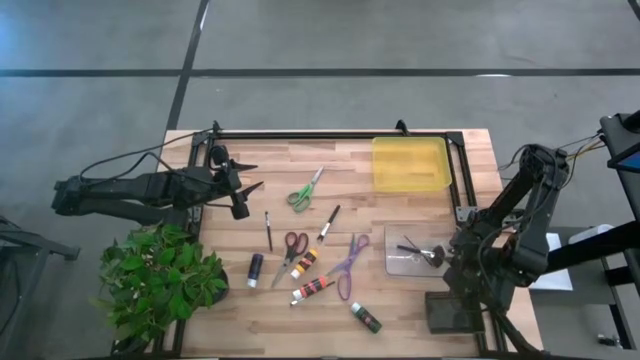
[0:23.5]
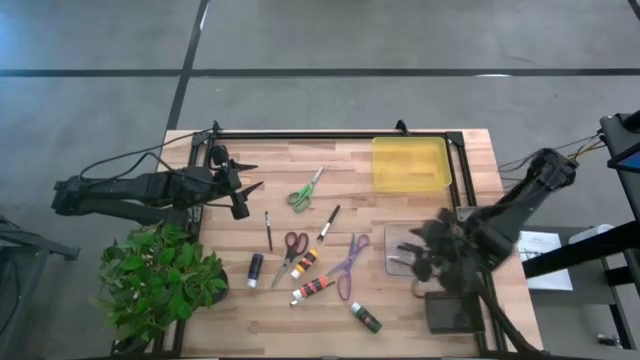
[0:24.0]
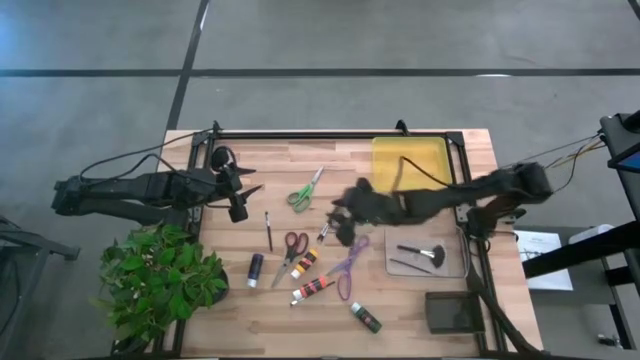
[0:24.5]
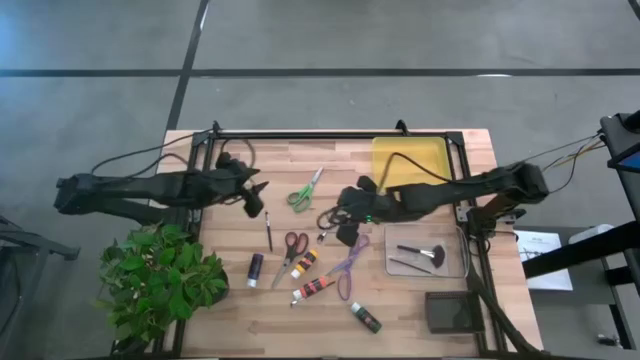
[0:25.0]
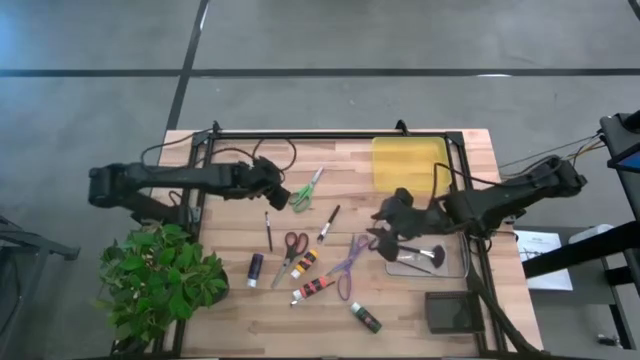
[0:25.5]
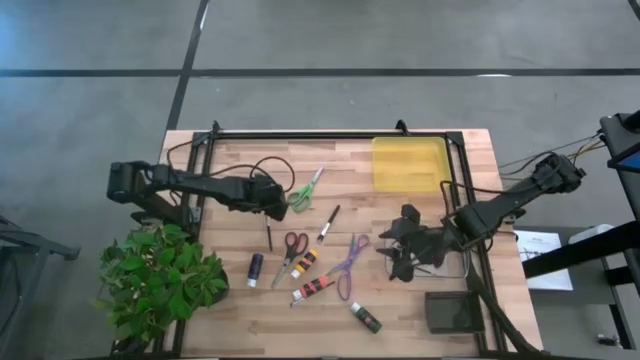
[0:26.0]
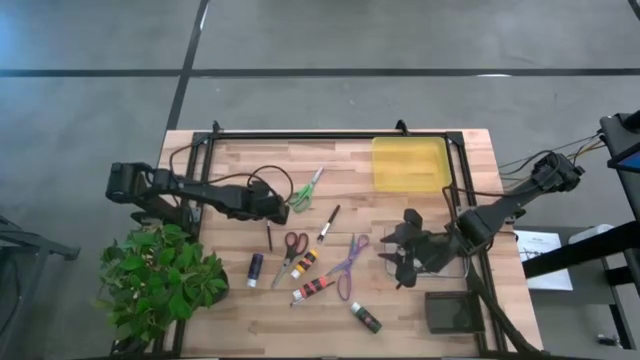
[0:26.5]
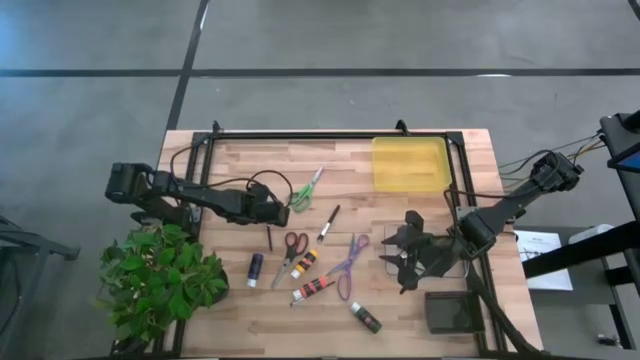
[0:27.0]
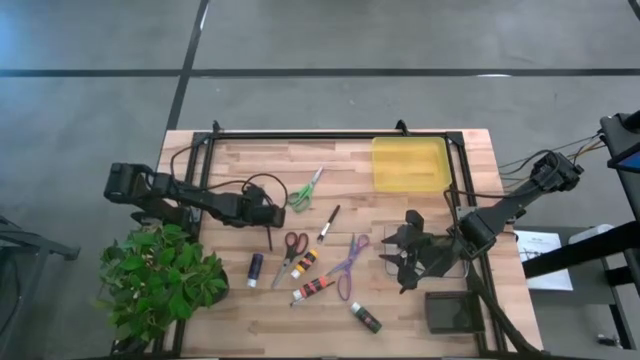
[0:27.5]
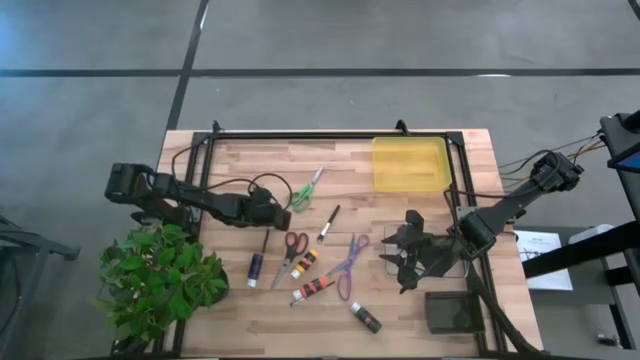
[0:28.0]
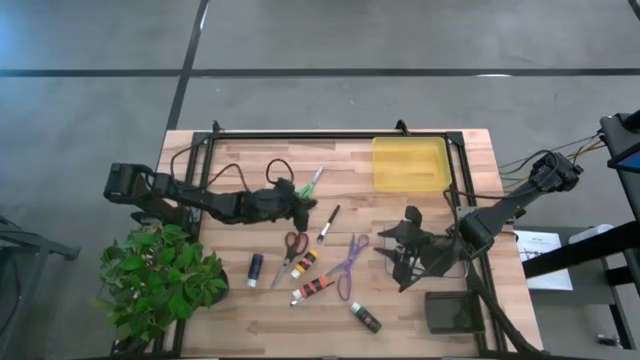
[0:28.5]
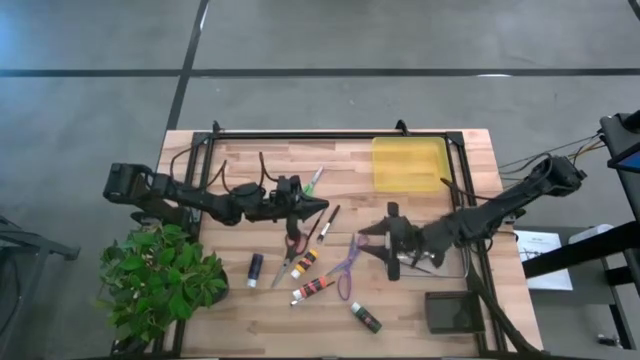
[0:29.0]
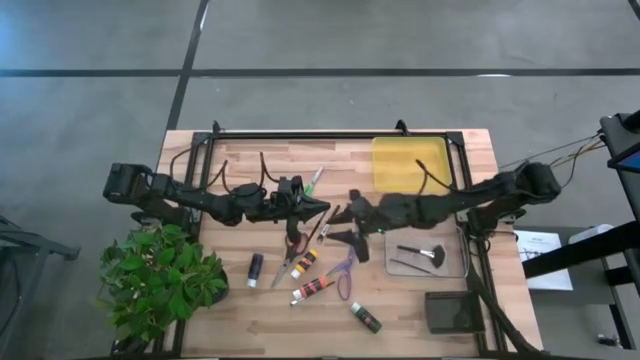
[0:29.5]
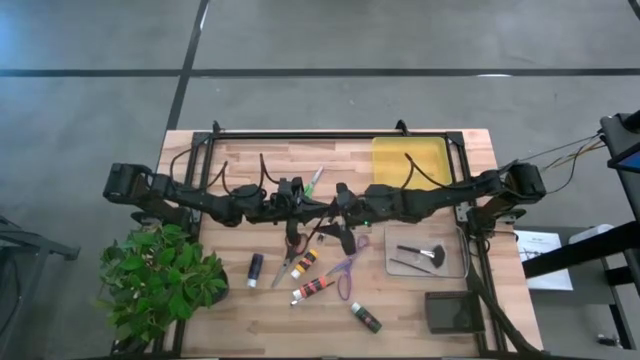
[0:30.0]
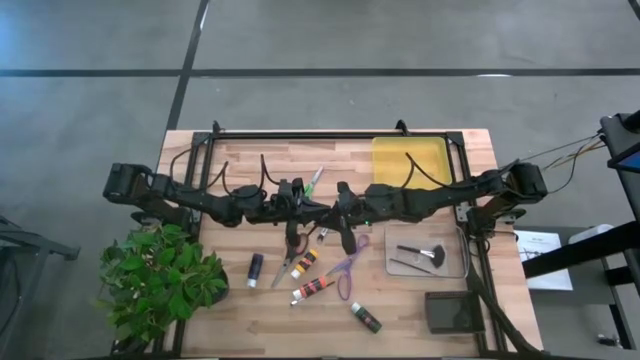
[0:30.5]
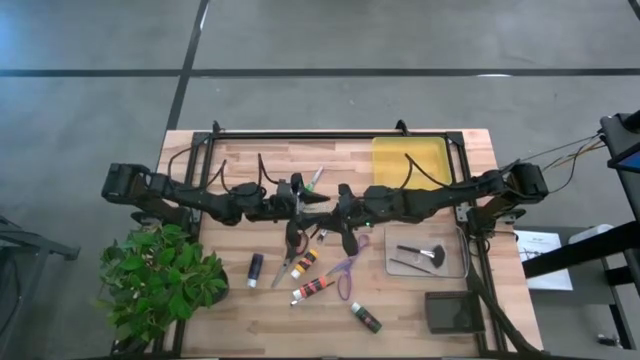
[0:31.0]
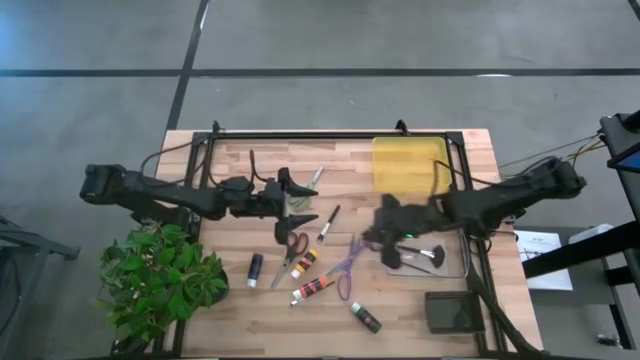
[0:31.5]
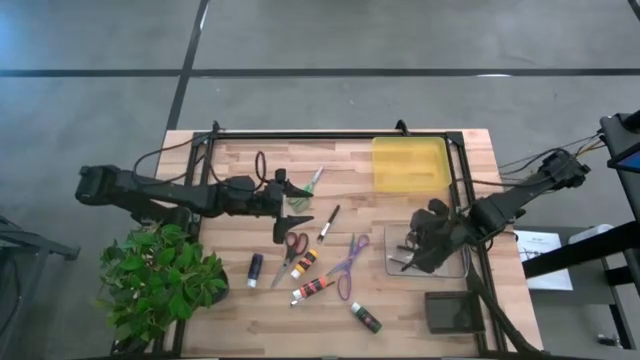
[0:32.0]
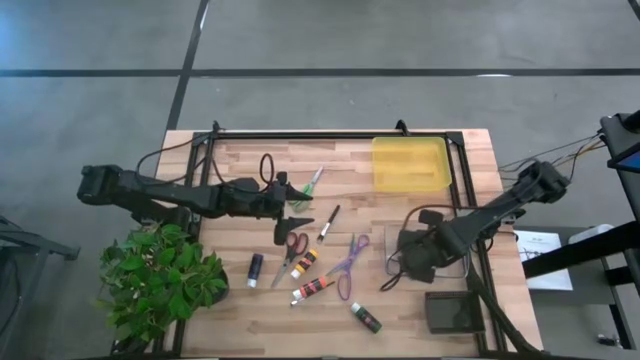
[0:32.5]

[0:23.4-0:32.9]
Task: Pick & Place Paint Supplies
Put the foundation brush into the transparent bin

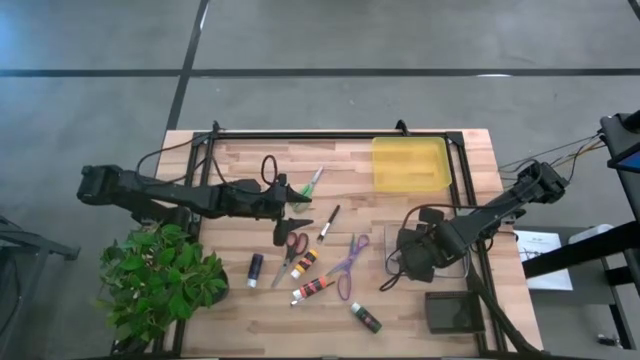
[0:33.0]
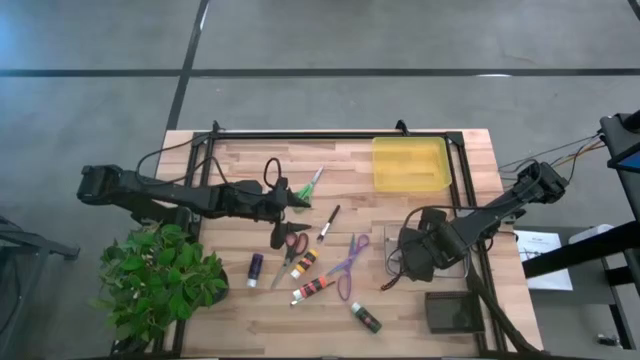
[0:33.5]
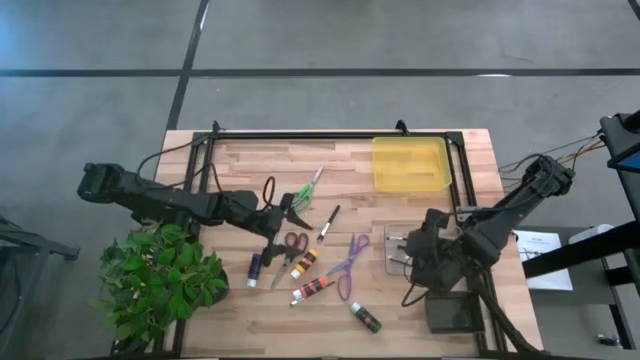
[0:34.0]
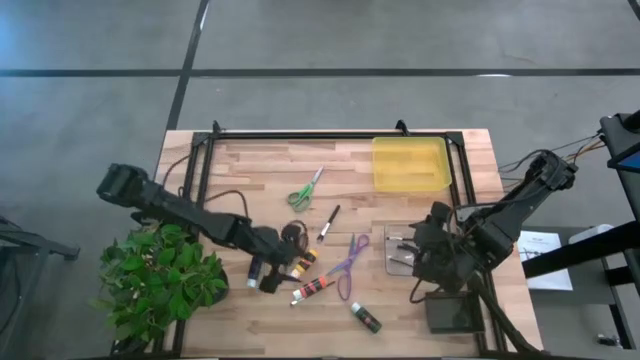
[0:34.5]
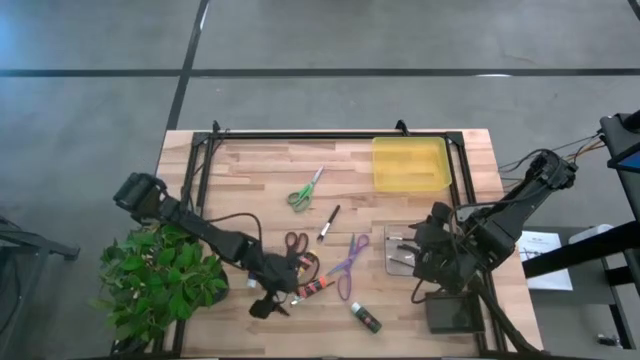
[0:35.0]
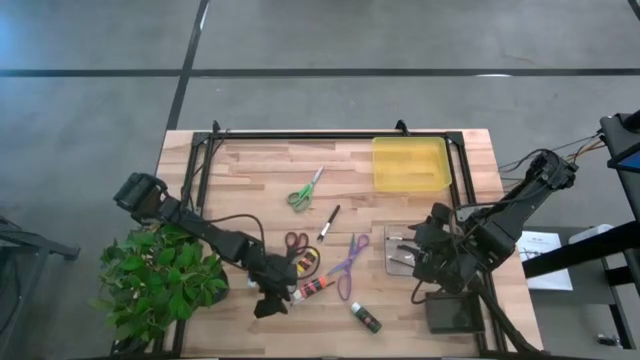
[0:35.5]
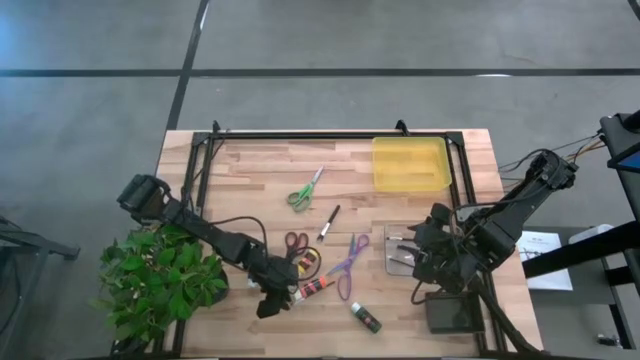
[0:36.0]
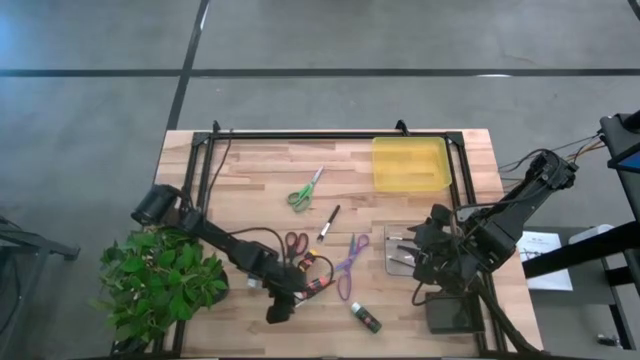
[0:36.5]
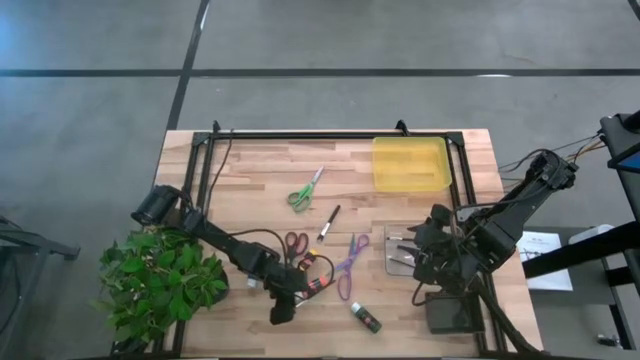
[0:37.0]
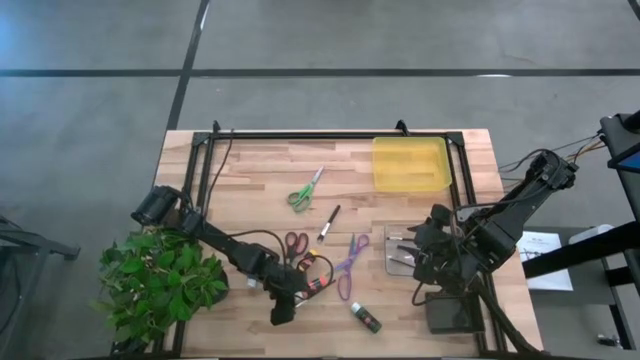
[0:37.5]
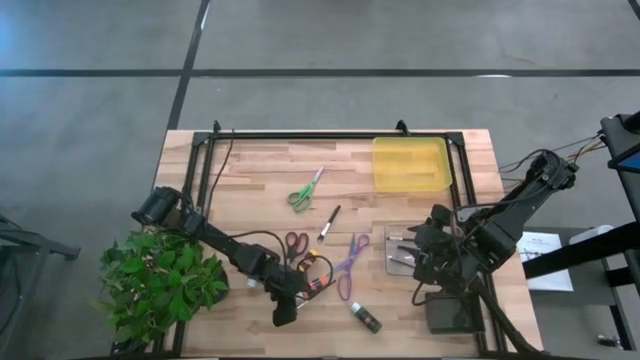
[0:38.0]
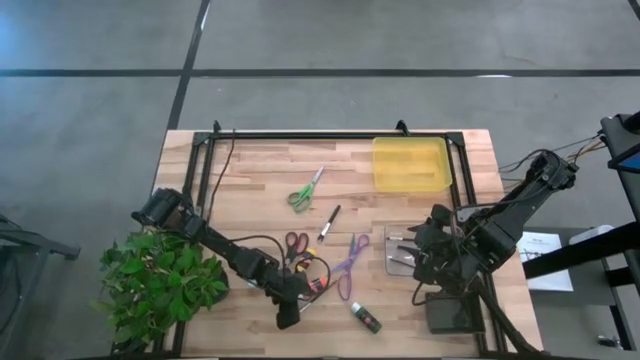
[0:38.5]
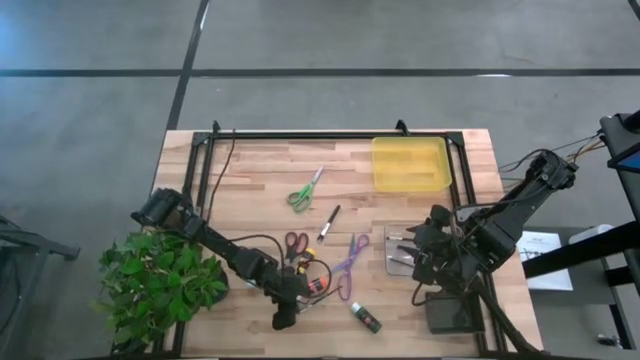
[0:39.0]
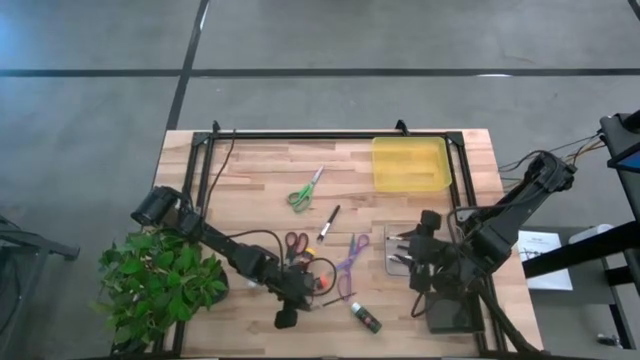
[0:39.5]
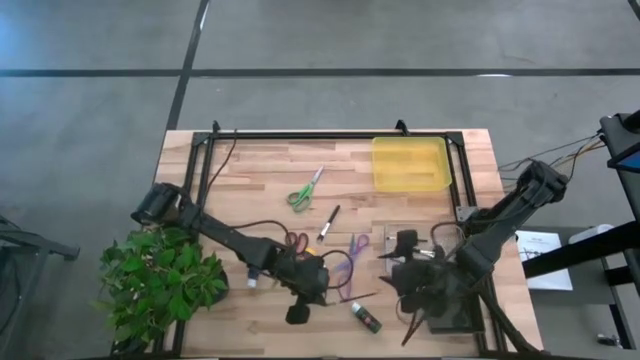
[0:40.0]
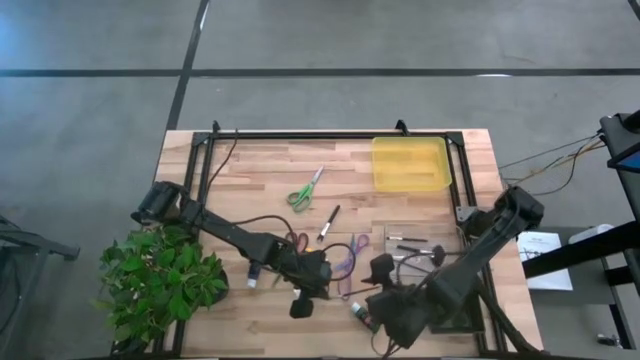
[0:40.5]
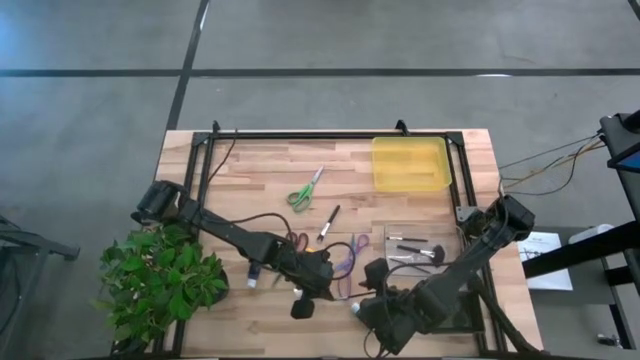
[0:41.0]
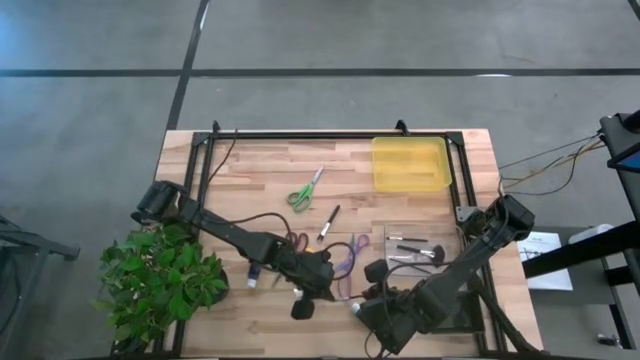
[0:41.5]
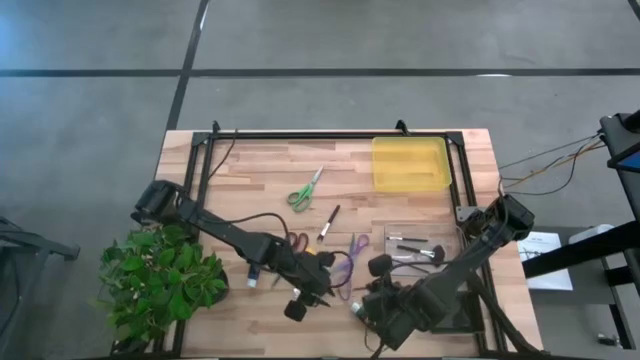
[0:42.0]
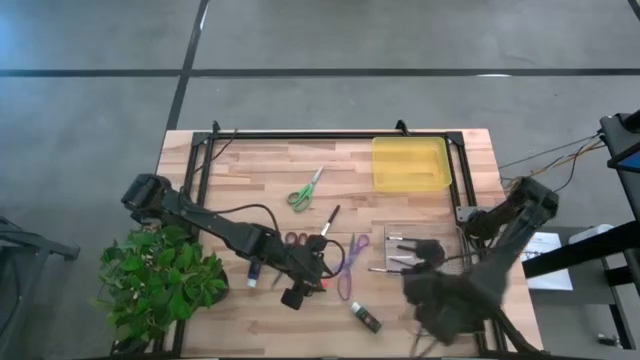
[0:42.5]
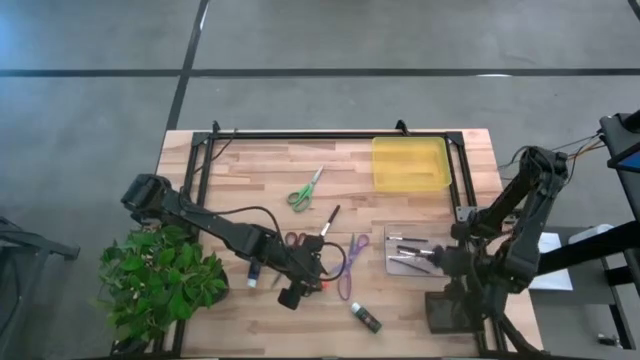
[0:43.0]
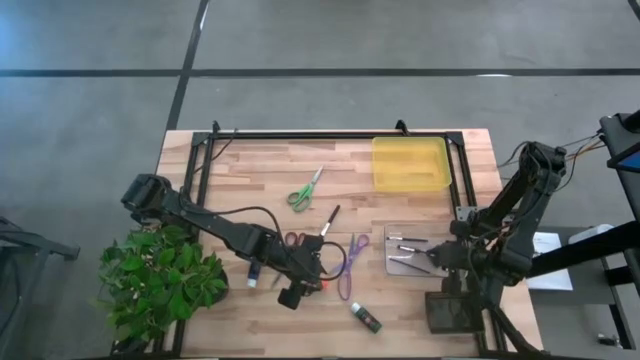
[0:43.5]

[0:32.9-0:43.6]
Put the eyeshadow brush into the transparent bin

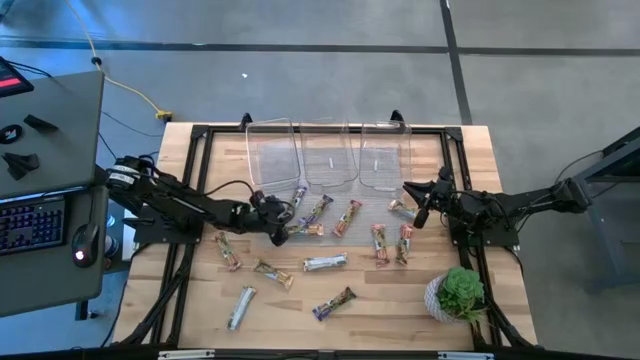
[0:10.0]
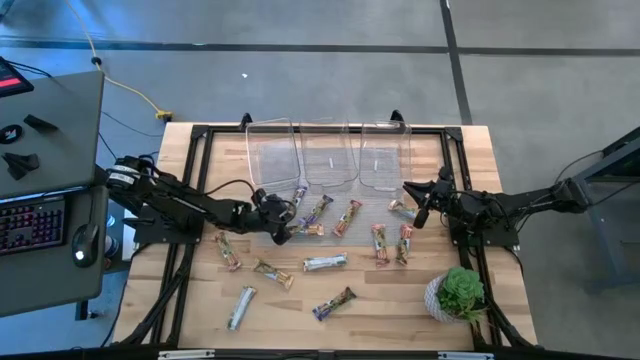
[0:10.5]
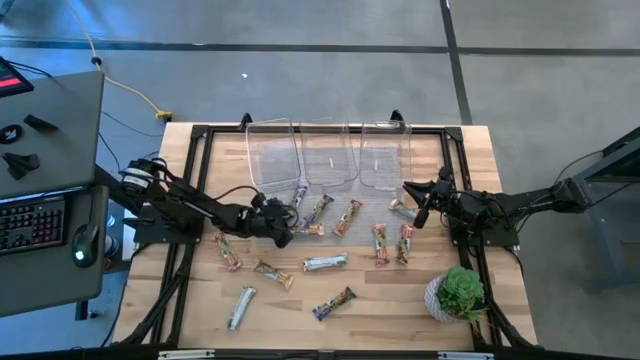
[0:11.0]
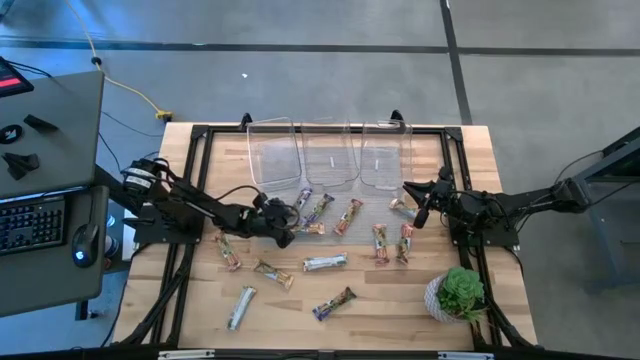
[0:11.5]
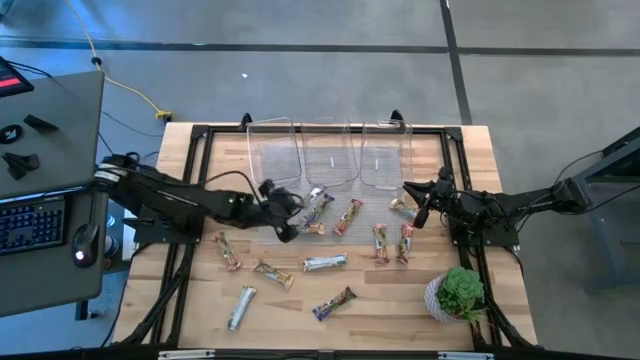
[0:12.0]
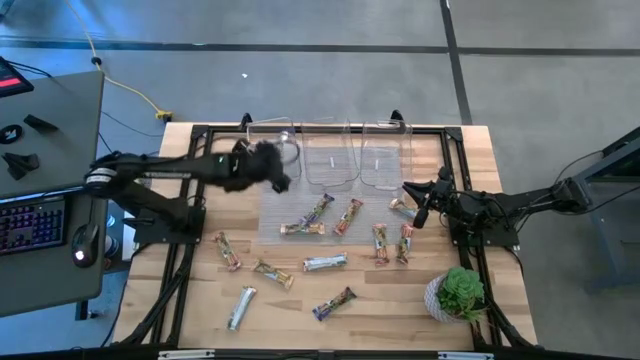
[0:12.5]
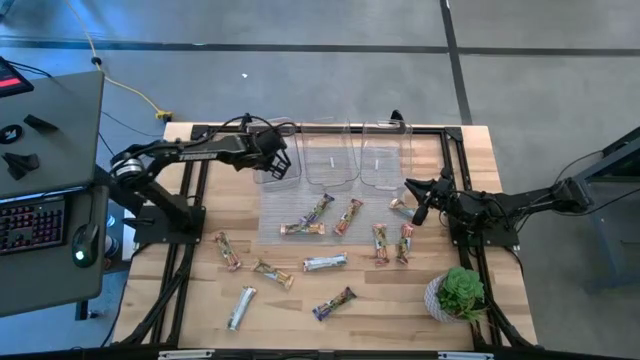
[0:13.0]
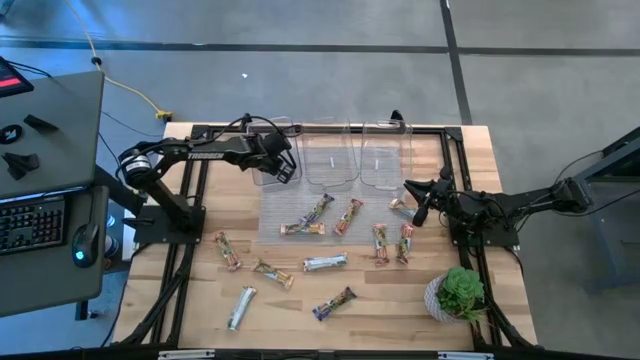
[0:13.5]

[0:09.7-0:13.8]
Task: Pick and place Granola Bars by type
Put the blue granola bar into the left transparent bin
